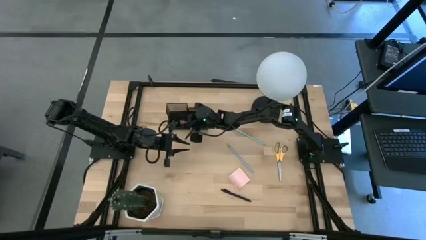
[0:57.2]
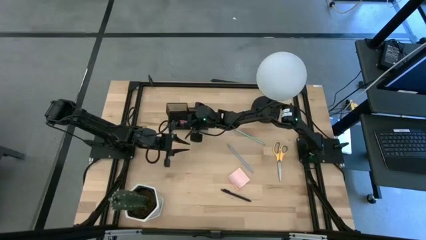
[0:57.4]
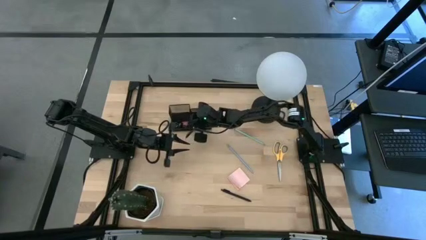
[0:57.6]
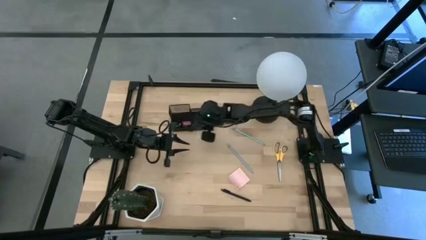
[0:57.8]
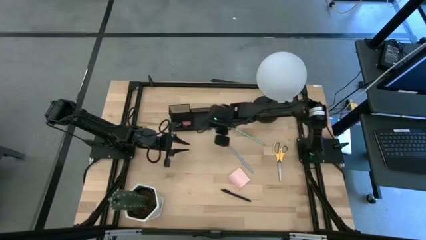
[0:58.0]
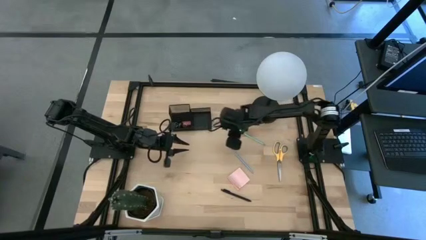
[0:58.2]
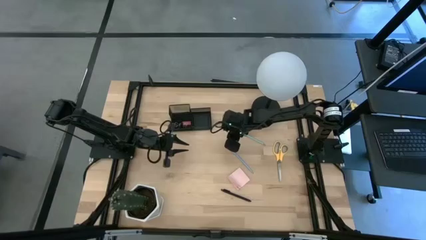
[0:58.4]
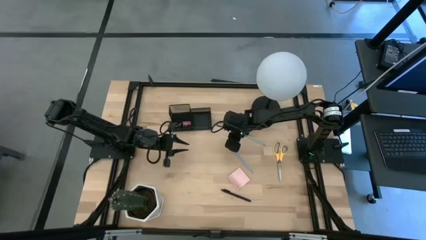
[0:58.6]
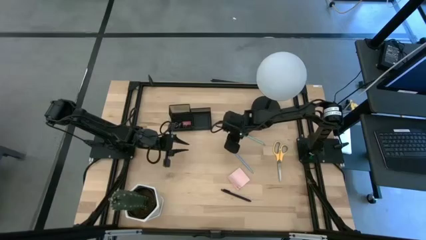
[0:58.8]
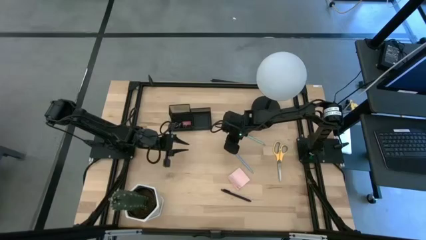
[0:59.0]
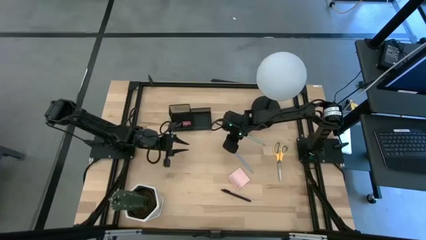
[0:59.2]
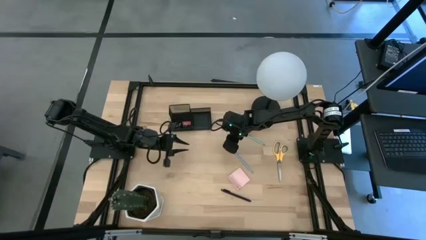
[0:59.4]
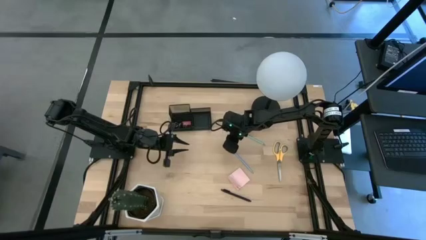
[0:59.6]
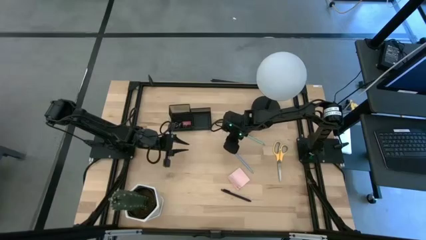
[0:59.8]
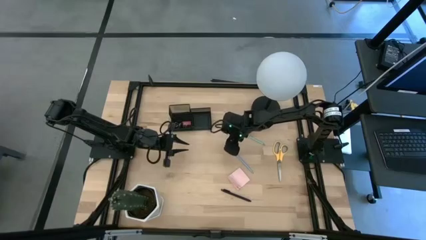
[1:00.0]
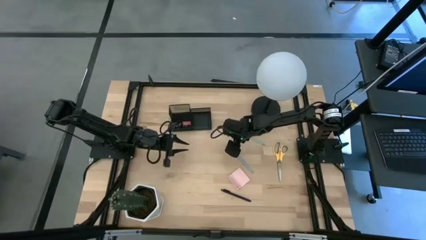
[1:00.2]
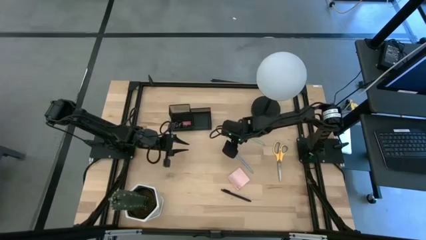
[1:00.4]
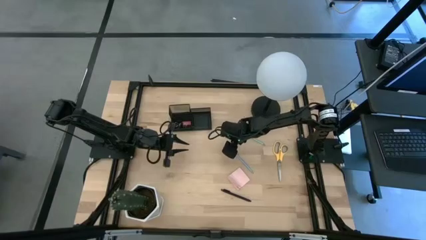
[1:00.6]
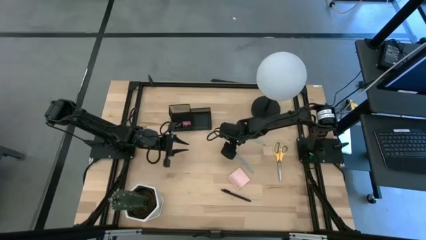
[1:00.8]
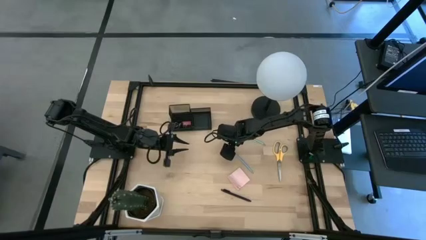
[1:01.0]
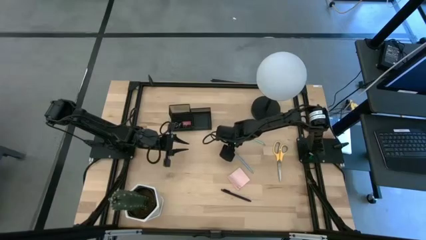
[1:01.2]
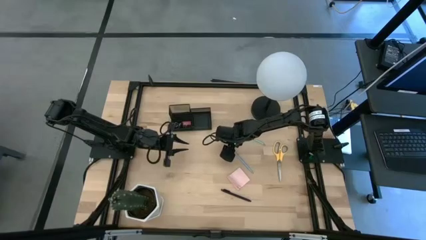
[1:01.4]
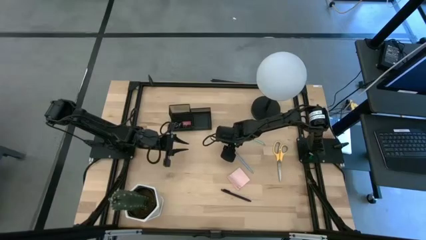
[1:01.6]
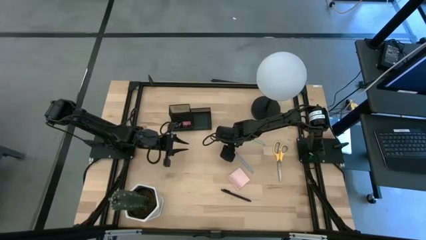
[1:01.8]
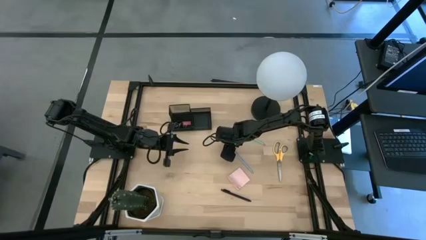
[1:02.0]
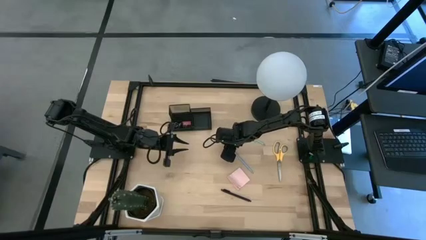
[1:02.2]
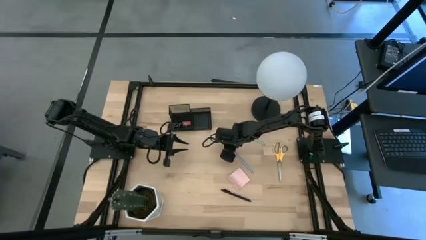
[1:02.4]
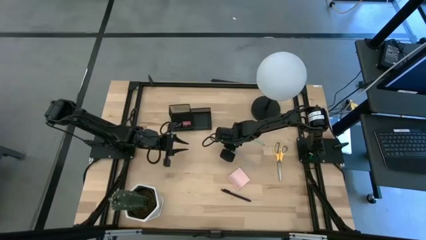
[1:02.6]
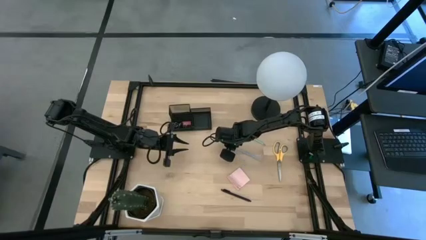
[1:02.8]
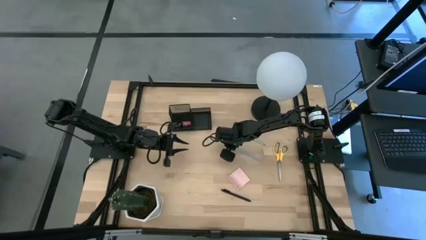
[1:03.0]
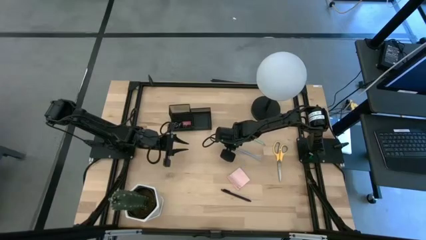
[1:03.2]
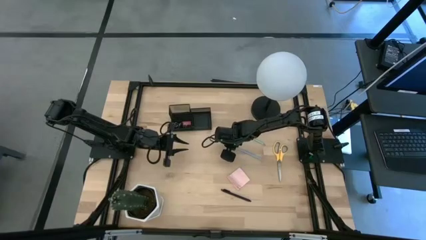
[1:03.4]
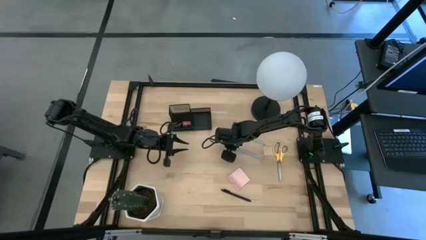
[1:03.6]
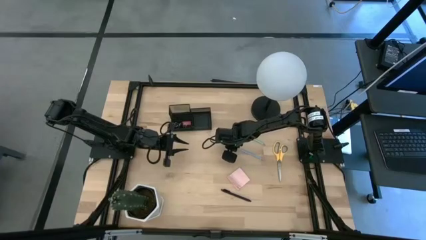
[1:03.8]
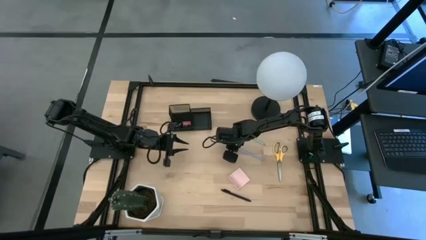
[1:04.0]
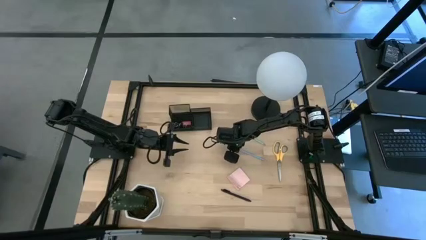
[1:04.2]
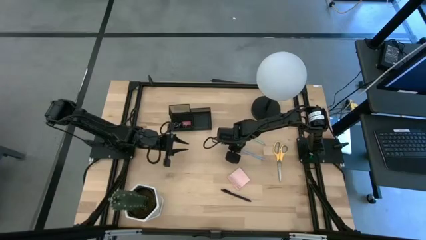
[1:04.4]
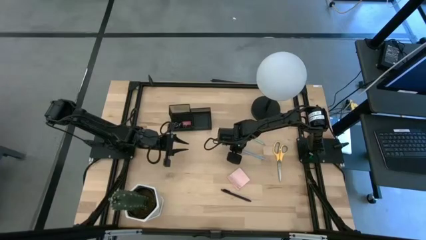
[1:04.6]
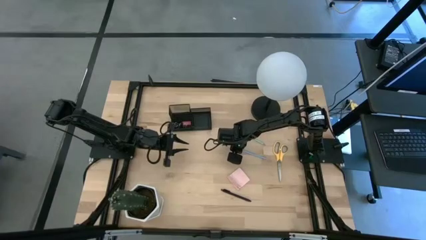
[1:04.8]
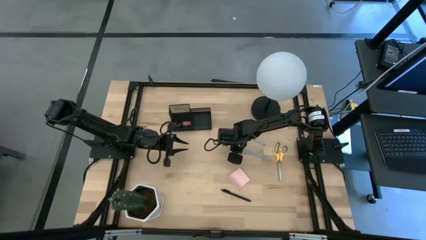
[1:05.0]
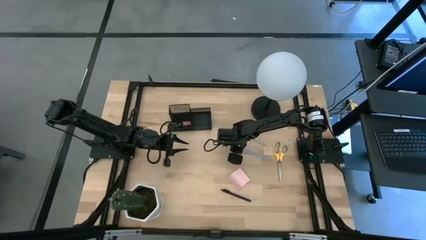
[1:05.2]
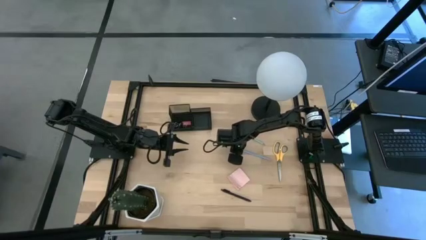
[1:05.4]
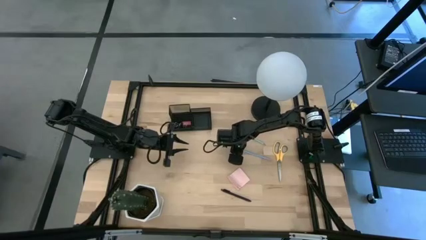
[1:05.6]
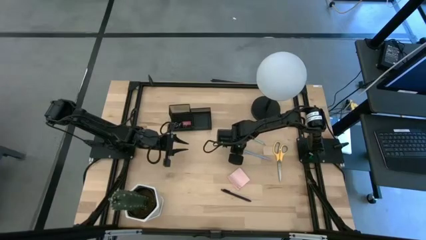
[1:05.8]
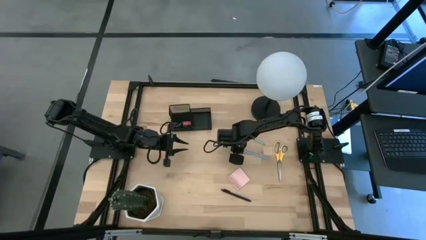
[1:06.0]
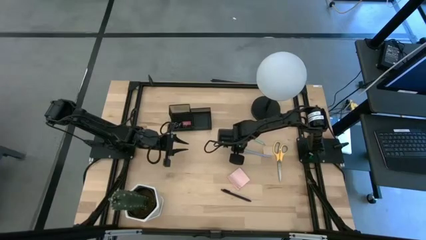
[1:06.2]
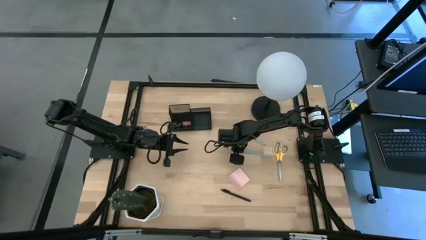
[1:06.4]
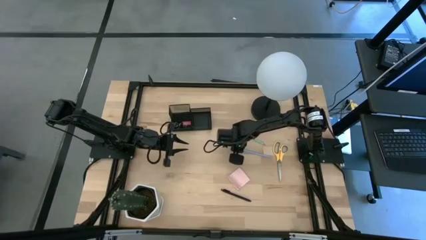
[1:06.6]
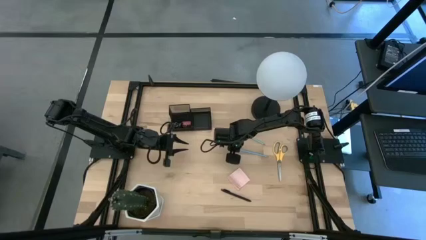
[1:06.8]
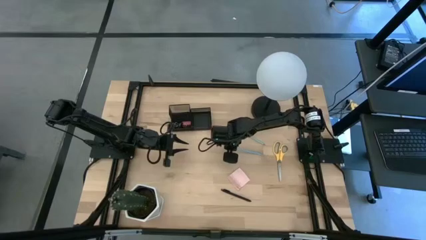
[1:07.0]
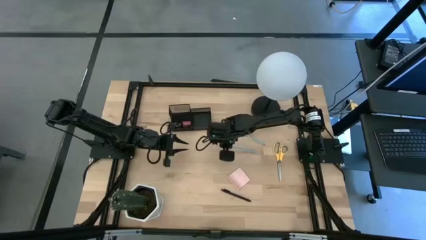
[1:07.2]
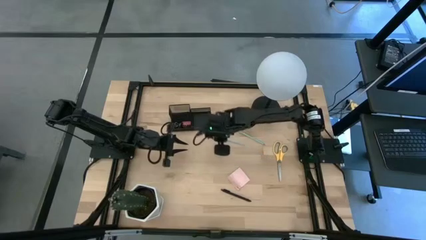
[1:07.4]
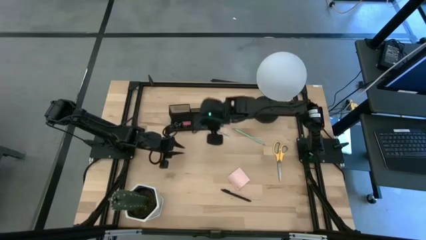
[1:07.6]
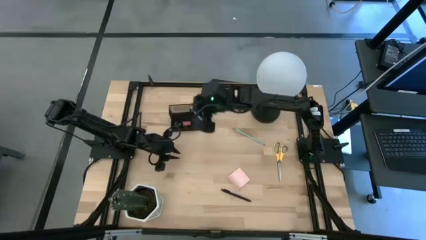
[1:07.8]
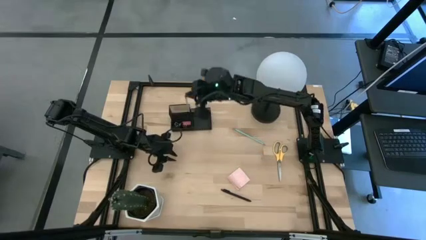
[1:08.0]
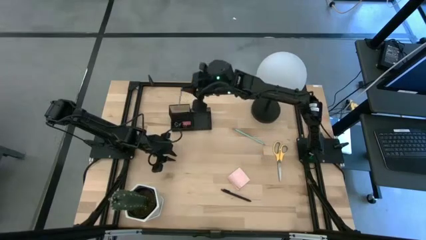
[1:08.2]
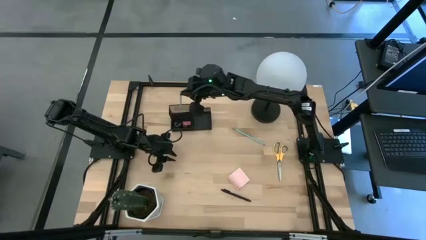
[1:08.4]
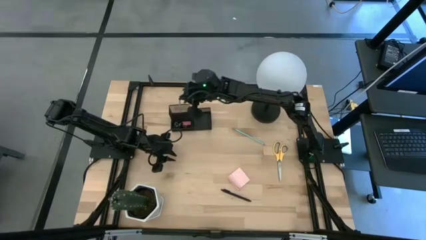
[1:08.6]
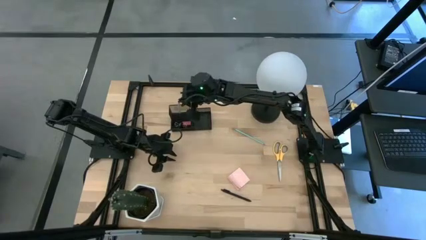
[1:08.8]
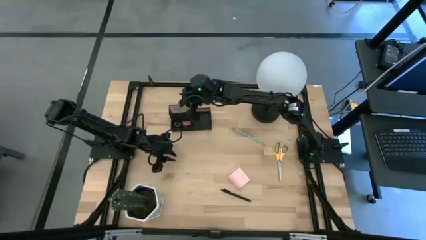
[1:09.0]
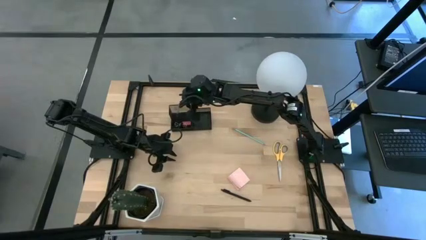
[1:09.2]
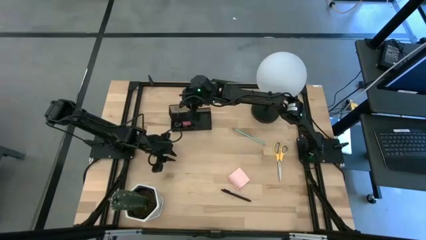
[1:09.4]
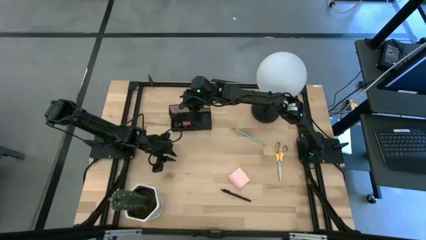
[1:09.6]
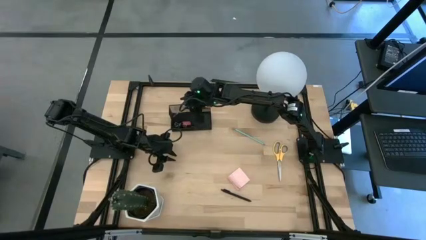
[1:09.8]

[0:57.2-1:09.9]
Task: Pick and place office supplies into organizer
Put the blue pencil into the desk organizer

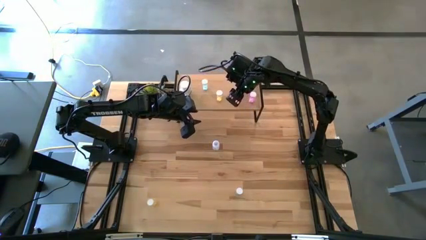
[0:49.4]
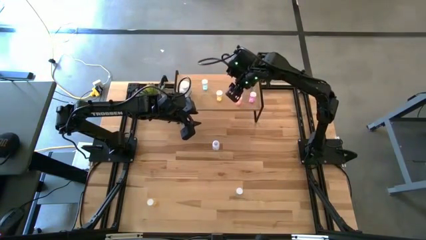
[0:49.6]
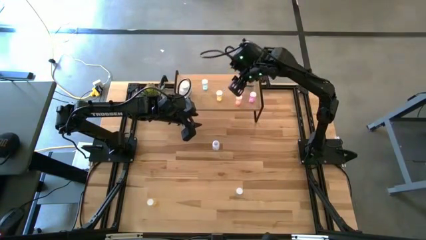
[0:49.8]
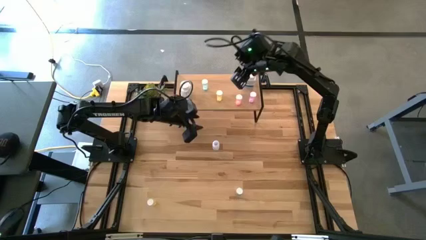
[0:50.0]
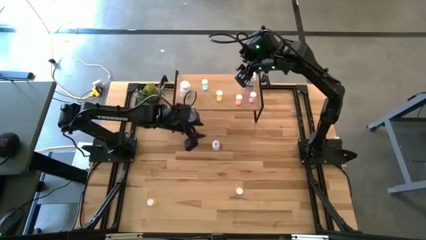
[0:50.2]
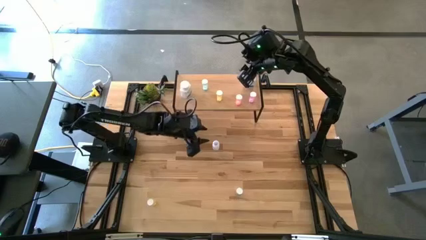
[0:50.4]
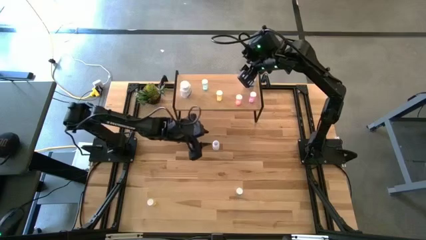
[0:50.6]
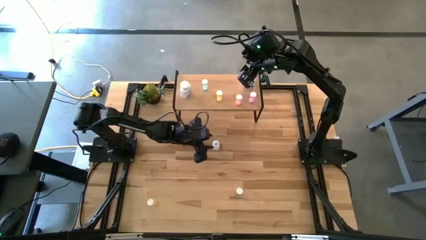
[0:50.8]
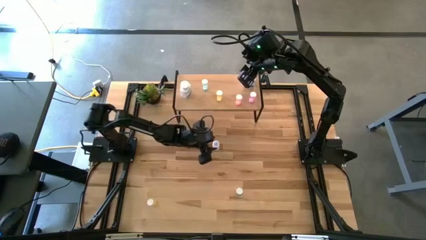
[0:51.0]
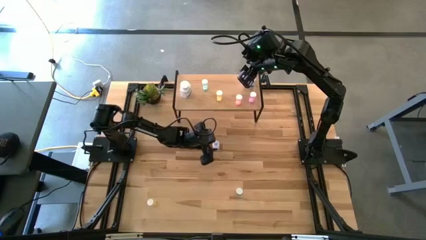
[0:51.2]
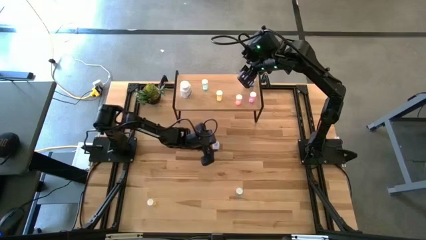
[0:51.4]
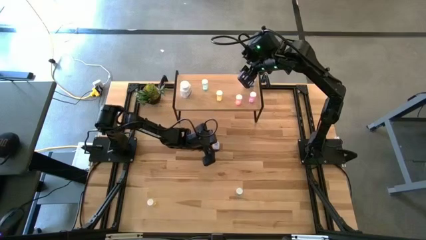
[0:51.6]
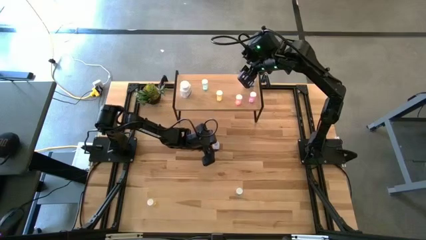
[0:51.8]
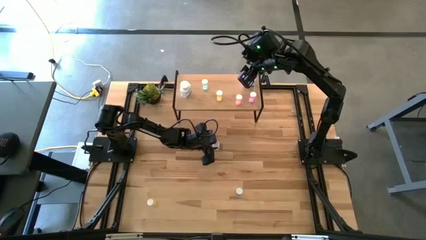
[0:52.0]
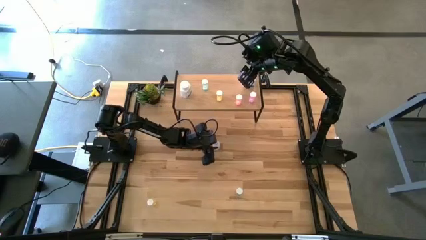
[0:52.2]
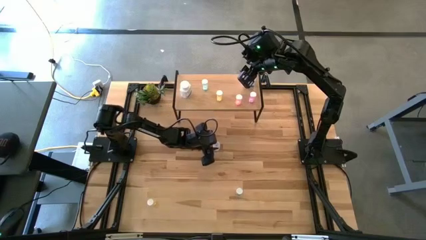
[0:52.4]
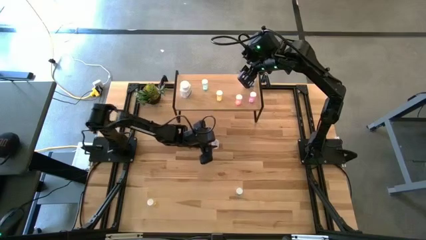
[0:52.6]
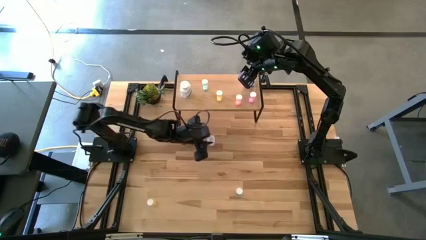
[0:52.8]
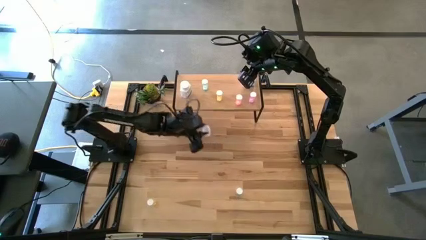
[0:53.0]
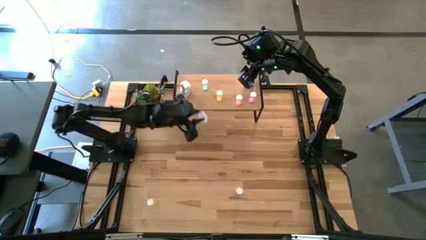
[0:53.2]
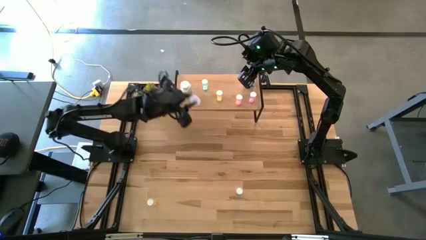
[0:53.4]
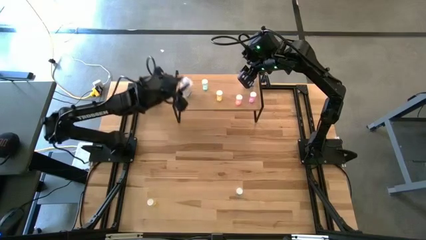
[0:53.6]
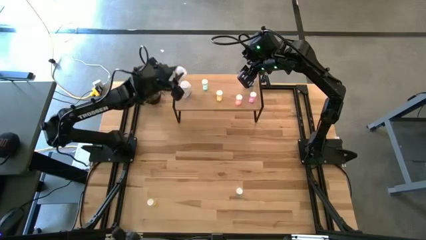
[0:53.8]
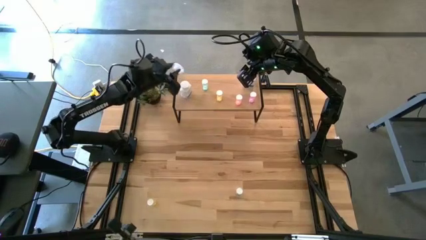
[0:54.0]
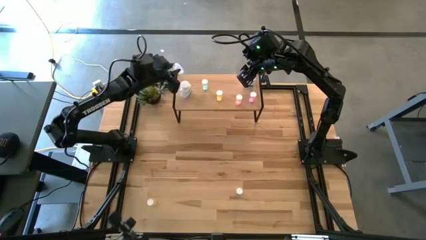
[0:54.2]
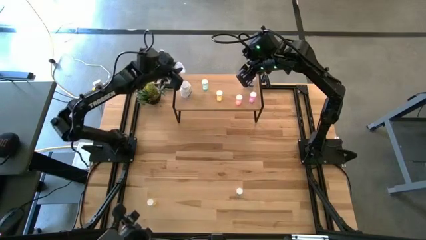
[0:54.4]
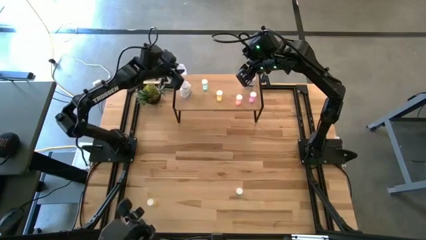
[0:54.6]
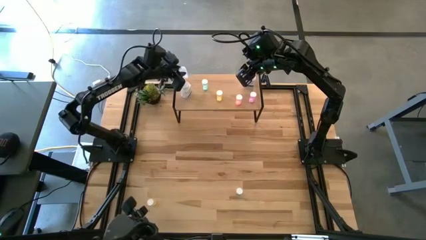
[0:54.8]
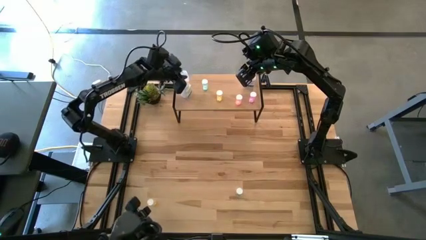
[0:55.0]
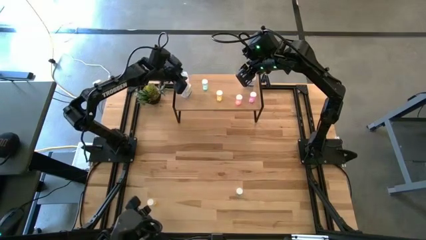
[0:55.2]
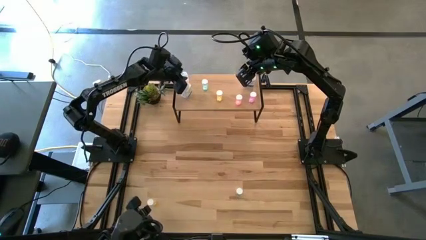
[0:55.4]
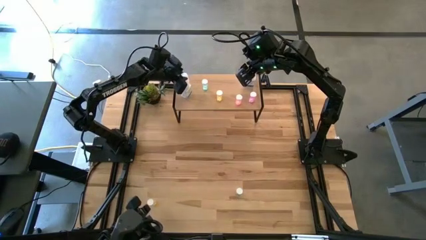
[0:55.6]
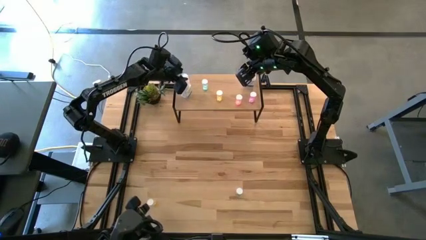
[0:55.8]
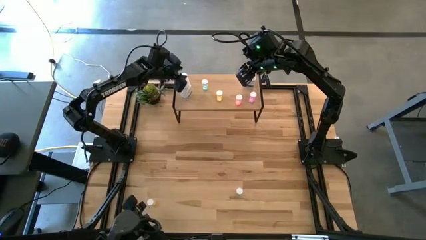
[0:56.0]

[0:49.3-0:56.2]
Task: Pick and place medicine bottles onto shelf by color
Put the transparent pill bottle on the shelf
